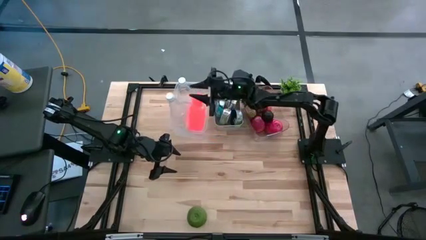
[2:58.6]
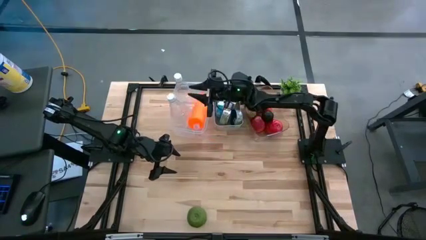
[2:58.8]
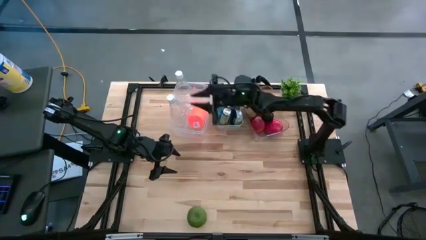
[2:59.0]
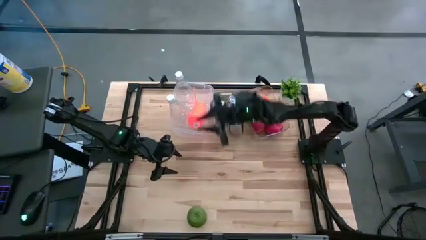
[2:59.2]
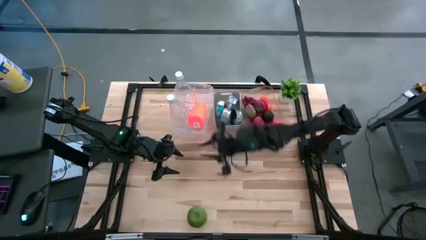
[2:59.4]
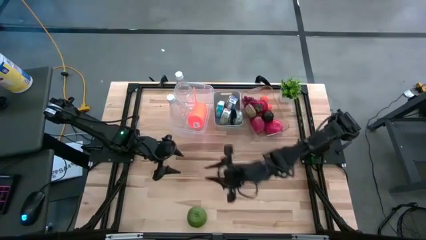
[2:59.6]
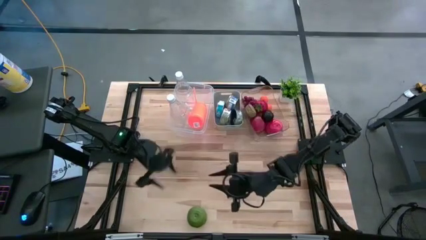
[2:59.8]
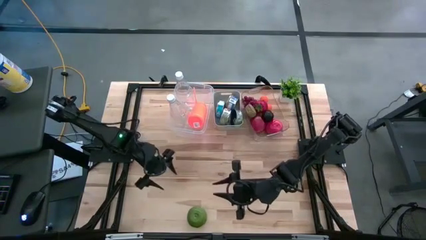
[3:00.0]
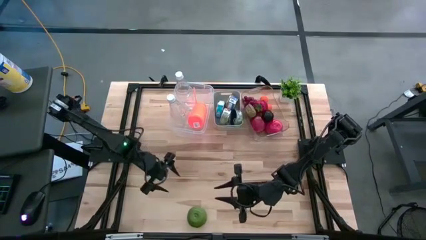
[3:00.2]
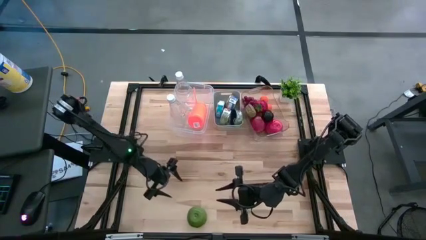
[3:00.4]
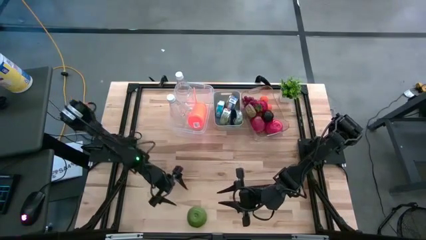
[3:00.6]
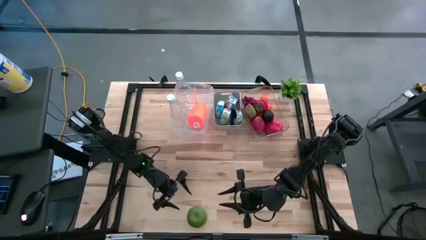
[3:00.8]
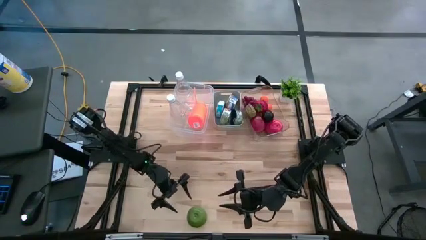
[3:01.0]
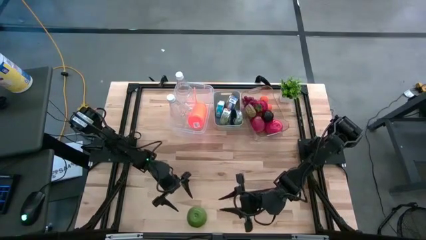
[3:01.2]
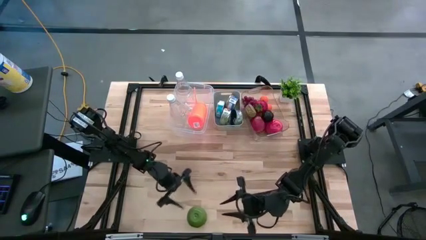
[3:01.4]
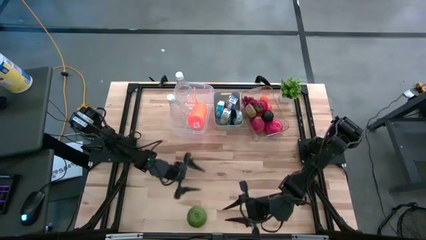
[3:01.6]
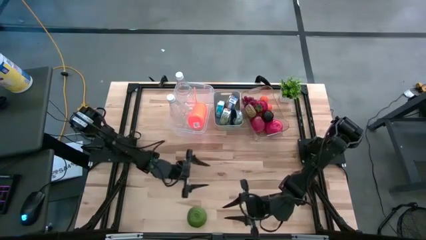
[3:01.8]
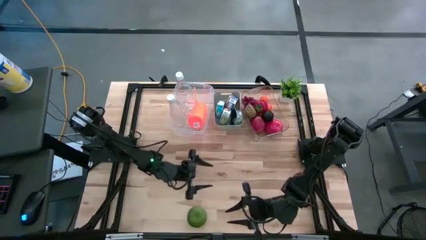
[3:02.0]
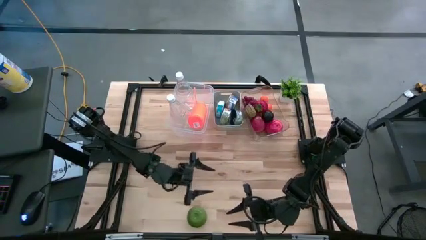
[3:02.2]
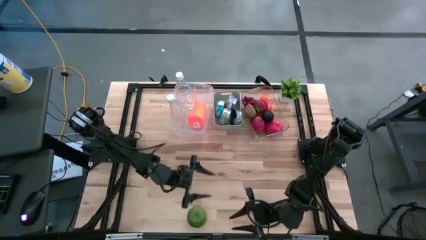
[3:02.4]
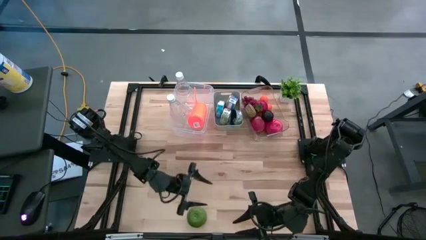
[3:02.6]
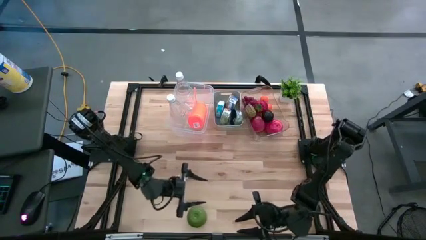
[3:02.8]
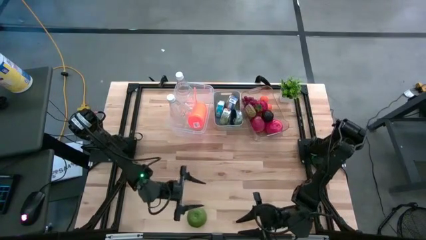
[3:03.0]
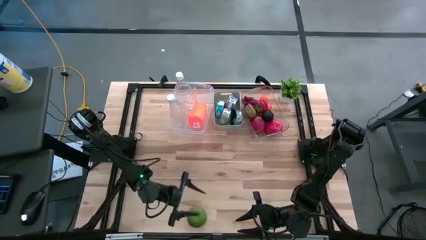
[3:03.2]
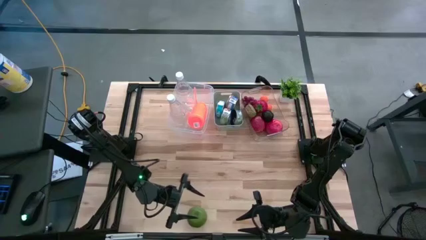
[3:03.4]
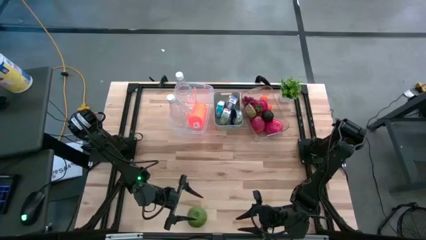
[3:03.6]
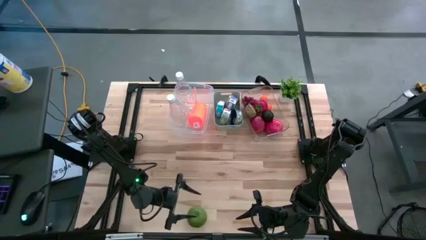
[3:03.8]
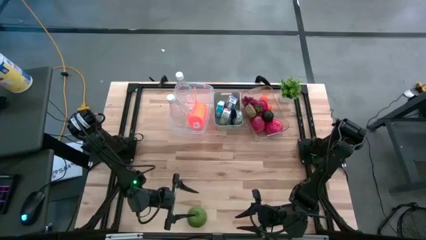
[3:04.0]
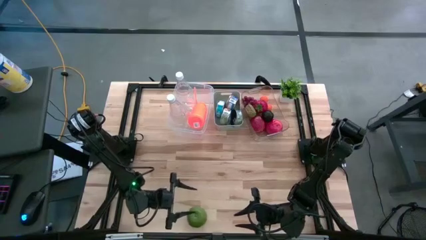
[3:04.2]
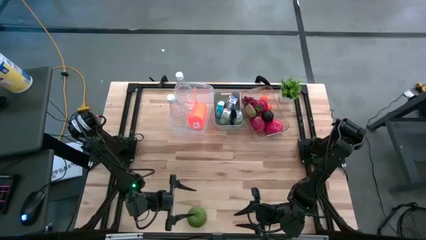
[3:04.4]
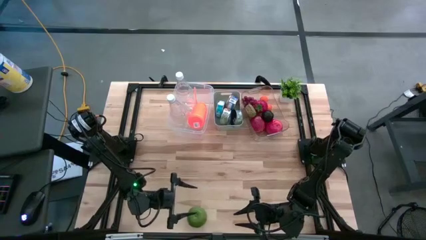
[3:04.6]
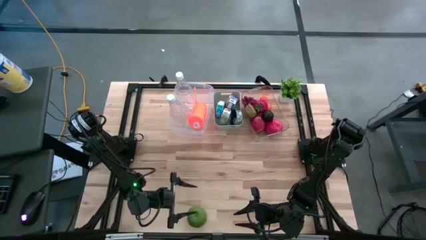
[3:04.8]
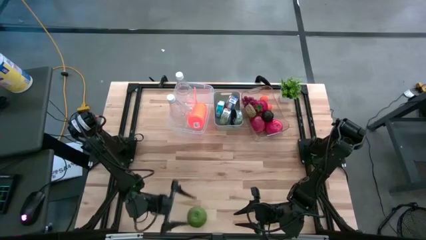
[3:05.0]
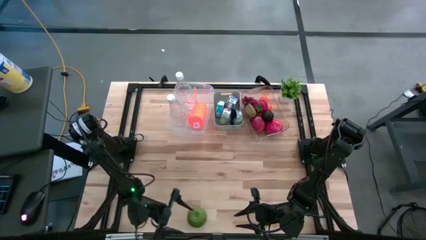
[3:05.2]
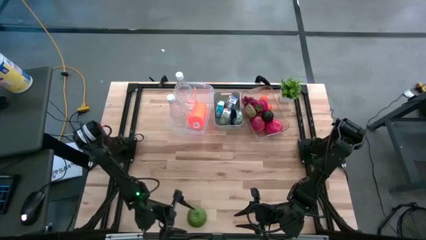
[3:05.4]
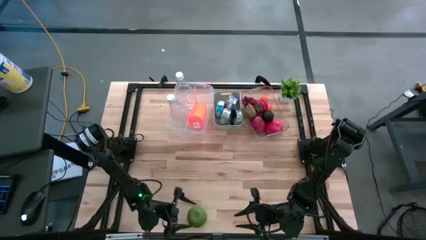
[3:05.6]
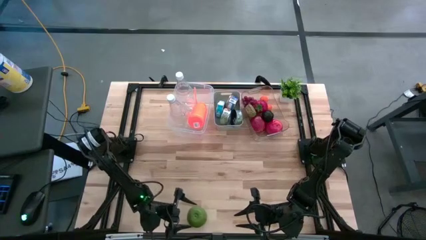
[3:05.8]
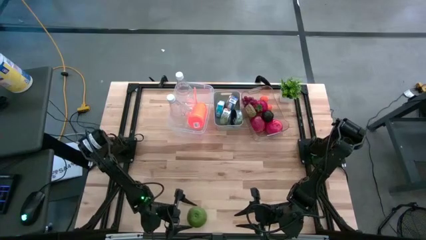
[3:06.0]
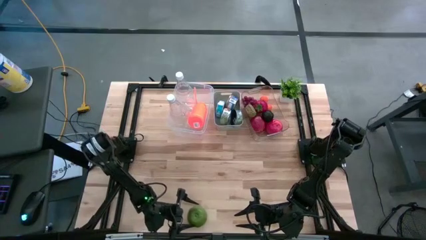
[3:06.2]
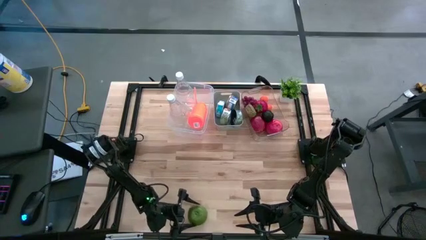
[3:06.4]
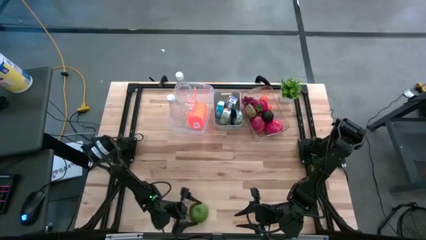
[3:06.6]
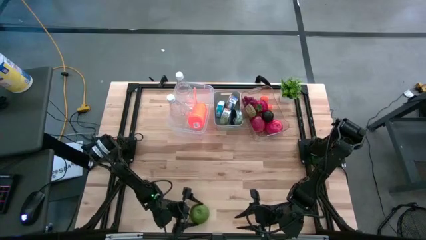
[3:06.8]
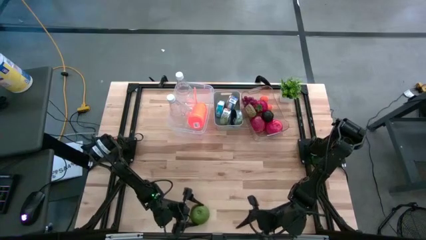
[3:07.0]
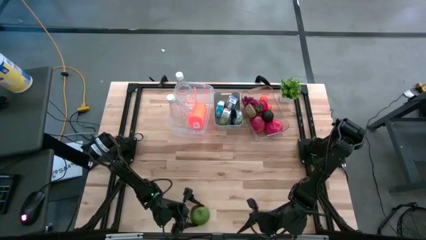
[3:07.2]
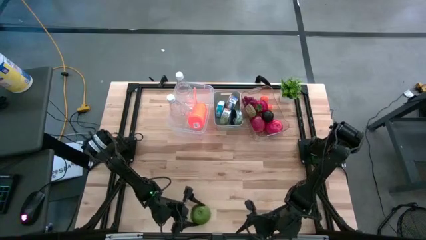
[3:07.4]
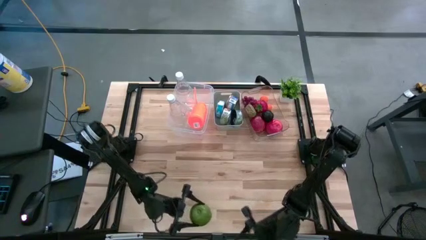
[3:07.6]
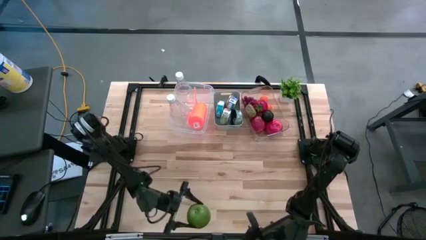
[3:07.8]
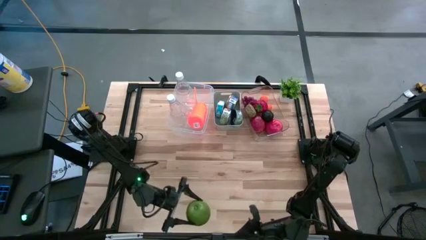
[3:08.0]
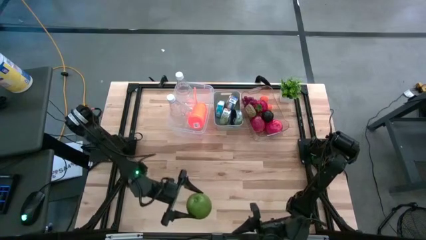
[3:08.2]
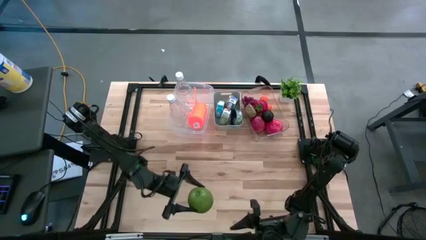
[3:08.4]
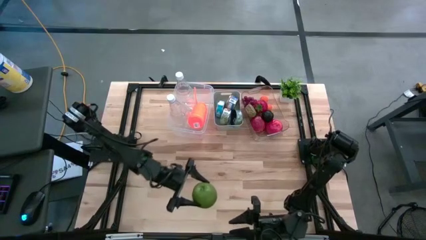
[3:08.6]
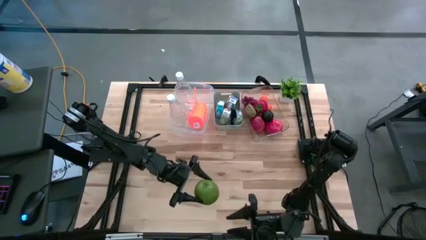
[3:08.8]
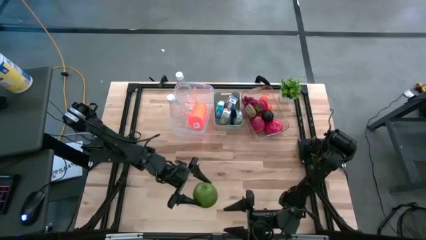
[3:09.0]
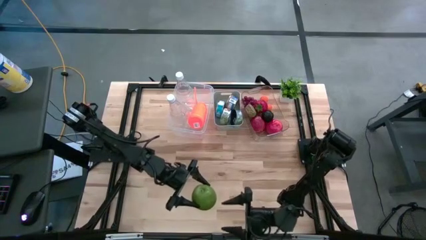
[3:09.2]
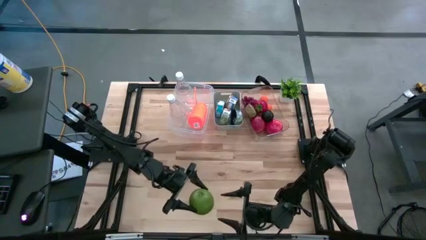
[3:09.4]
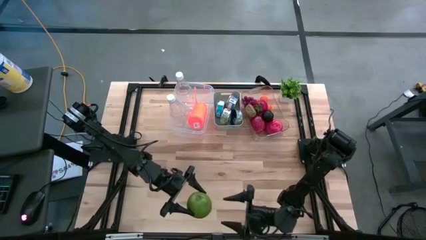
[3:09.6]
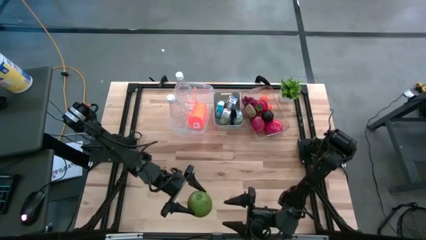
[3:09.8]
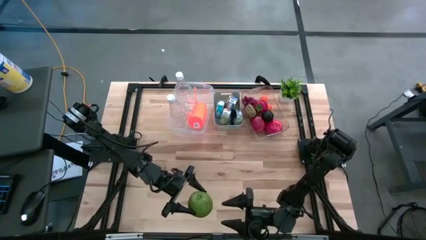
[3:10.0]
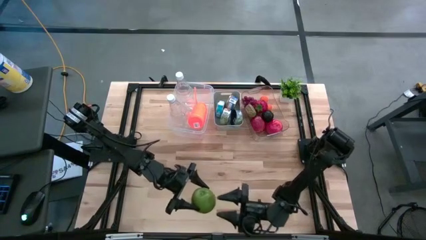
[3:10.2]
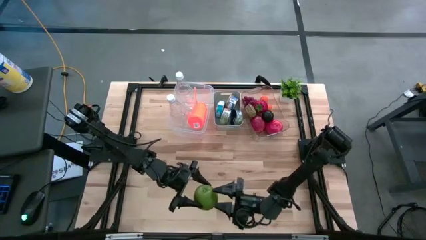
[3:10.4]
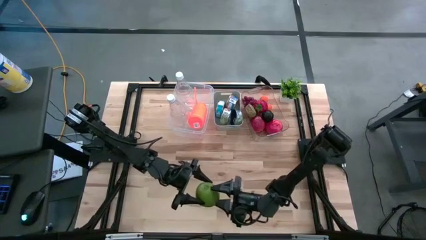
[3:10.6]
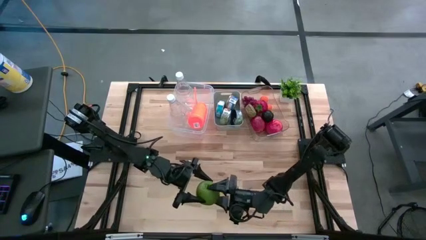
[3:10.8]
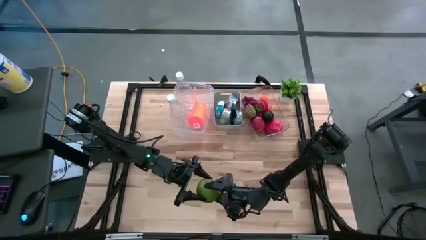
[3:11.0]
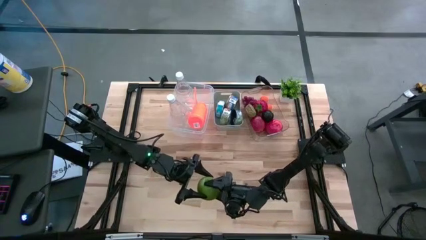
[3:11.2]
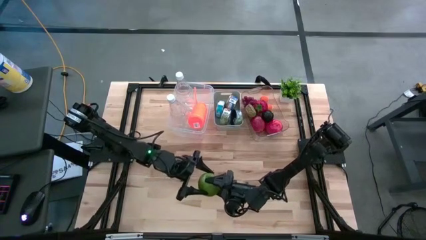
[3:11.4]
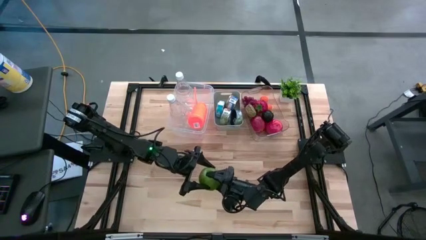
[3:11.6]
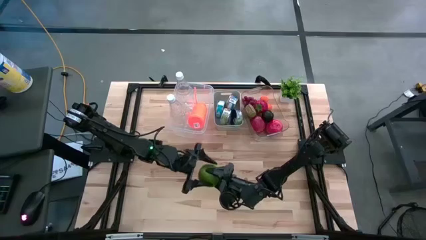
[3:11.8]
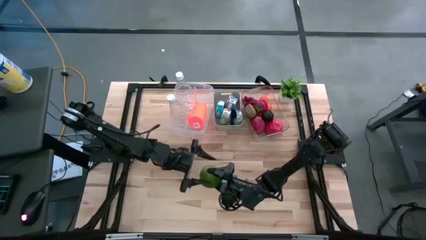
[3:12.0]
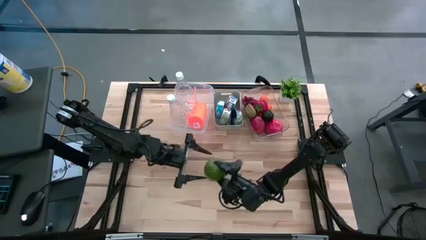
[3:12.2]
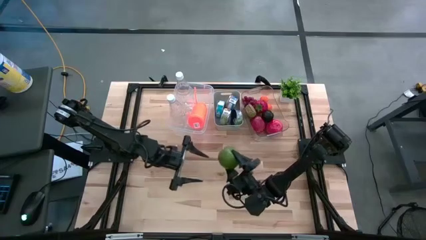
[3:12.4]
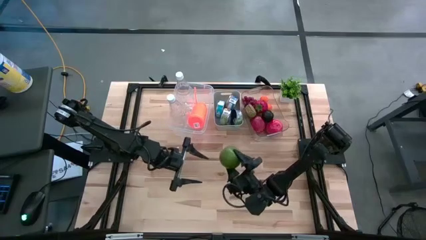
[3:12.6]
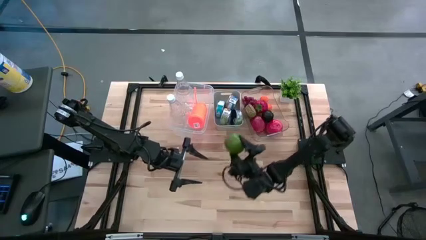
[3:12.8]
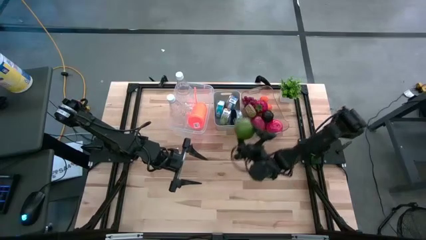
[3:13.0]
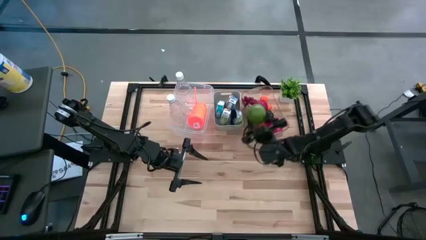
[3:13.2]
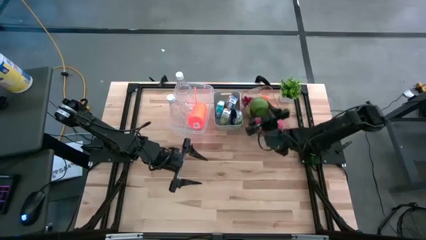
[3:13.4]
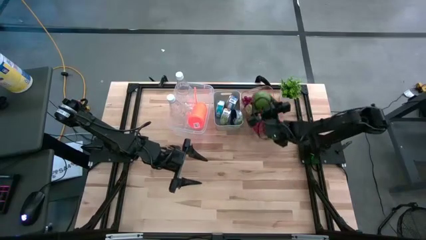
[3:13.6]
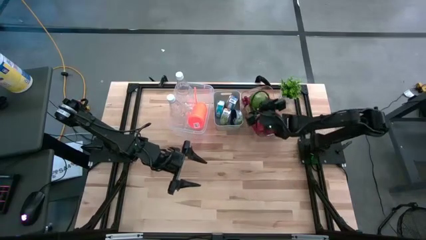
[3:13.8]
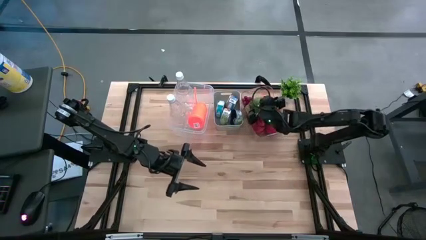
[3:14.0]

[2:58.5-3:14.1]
Task: Pick & Place Food Item
Put the green apple into the right transparent bin
